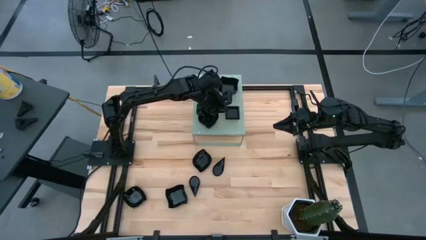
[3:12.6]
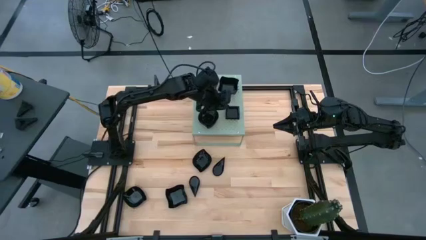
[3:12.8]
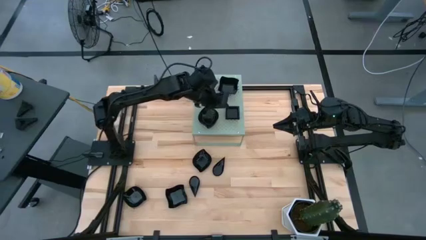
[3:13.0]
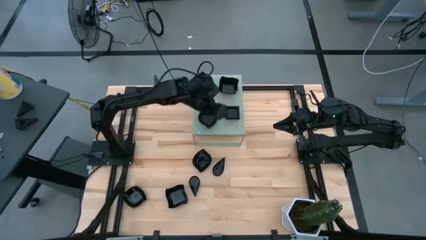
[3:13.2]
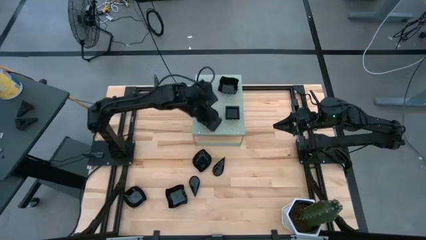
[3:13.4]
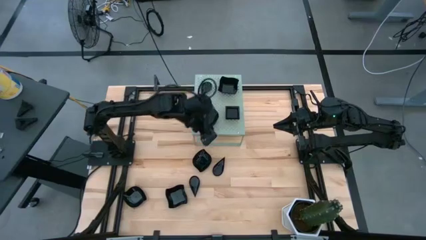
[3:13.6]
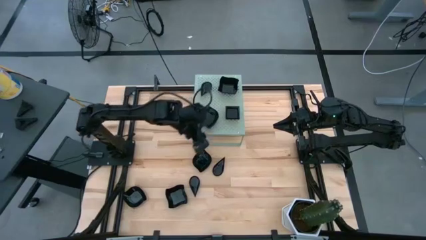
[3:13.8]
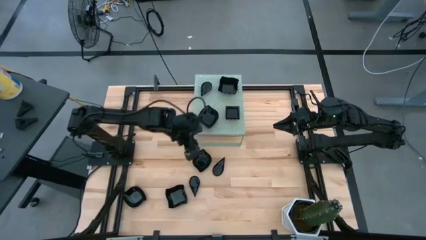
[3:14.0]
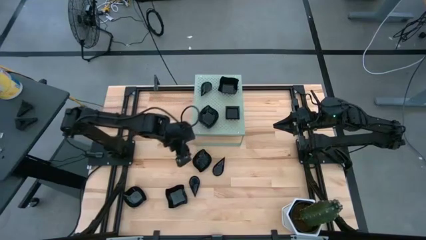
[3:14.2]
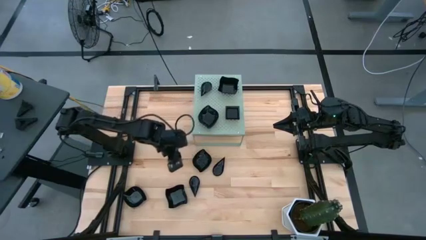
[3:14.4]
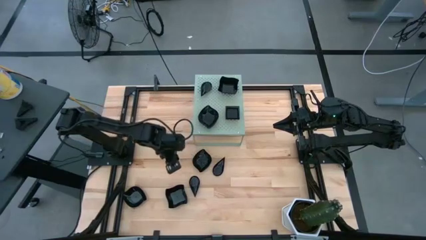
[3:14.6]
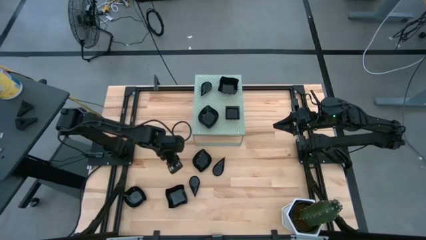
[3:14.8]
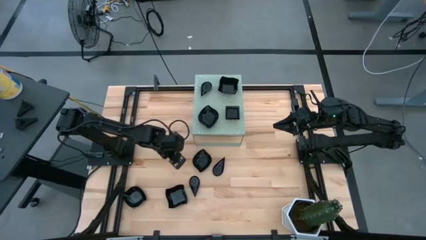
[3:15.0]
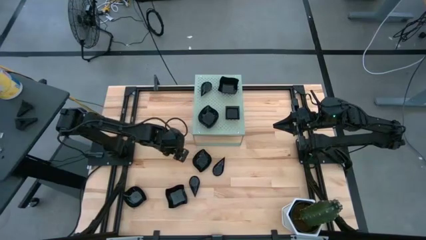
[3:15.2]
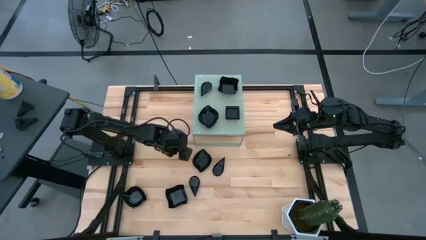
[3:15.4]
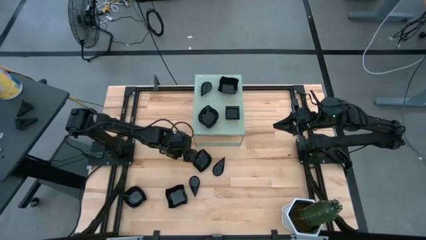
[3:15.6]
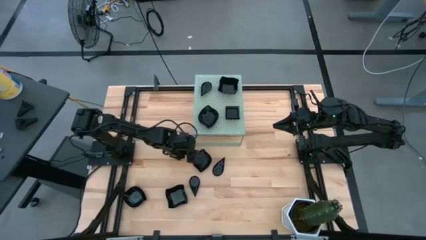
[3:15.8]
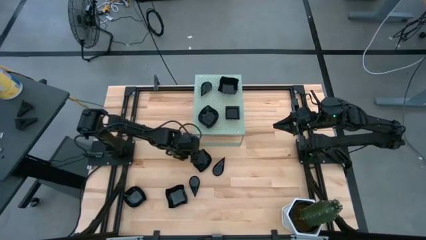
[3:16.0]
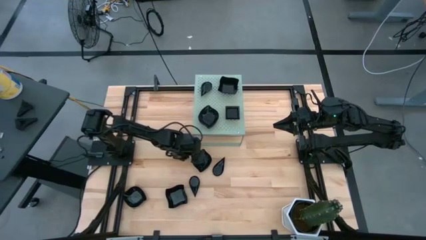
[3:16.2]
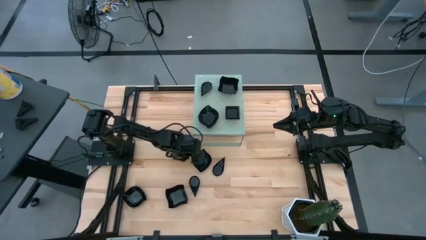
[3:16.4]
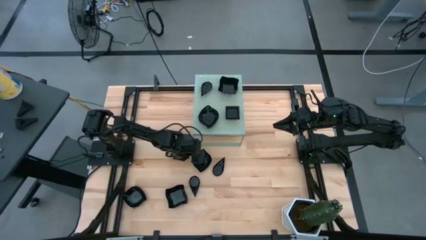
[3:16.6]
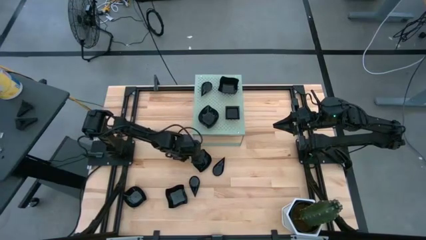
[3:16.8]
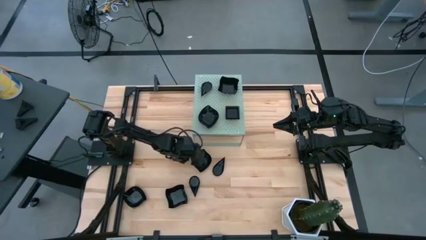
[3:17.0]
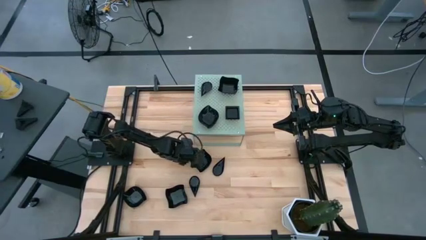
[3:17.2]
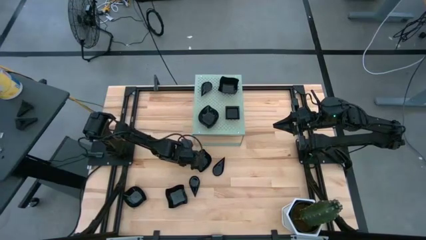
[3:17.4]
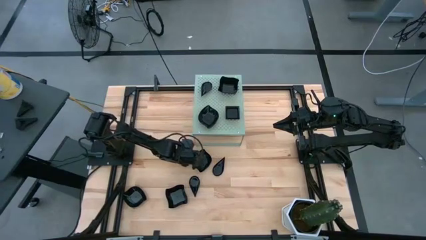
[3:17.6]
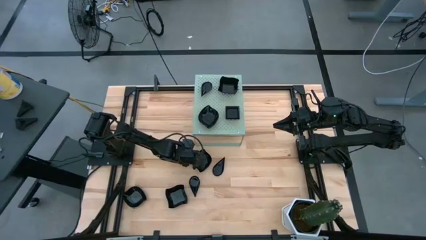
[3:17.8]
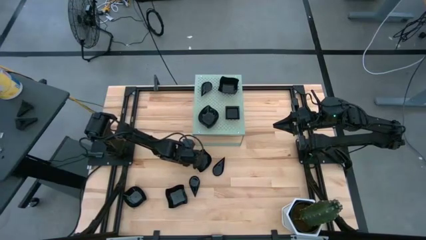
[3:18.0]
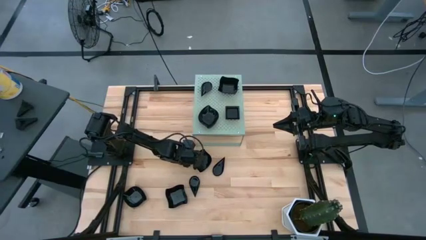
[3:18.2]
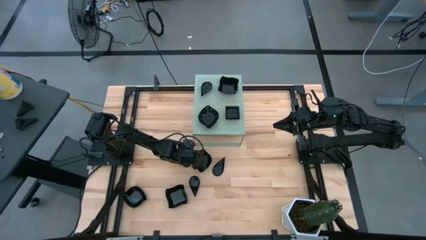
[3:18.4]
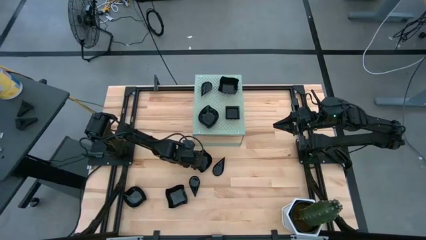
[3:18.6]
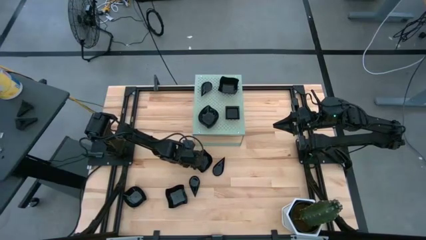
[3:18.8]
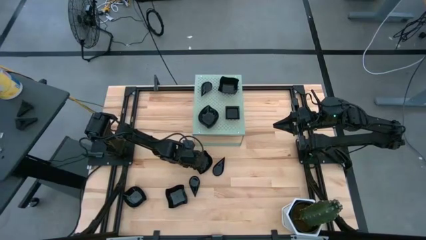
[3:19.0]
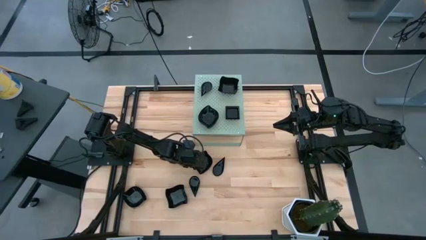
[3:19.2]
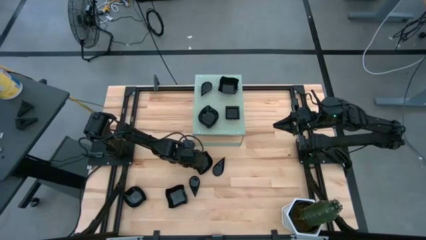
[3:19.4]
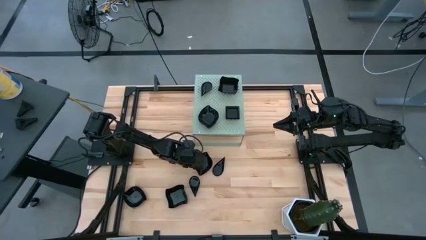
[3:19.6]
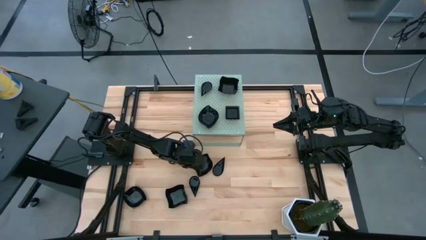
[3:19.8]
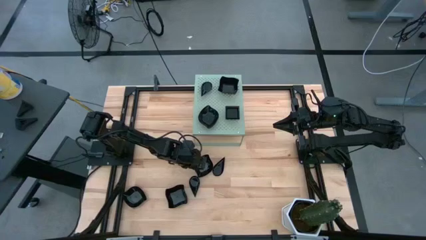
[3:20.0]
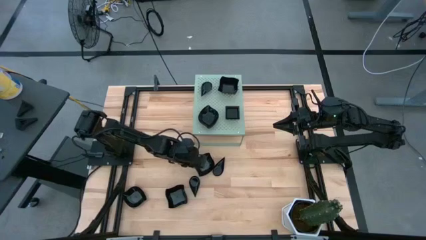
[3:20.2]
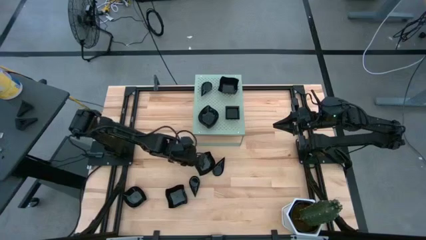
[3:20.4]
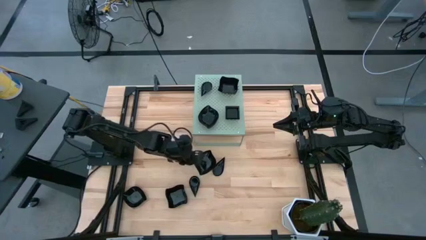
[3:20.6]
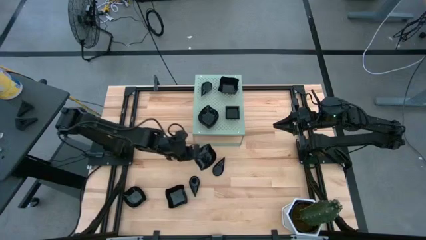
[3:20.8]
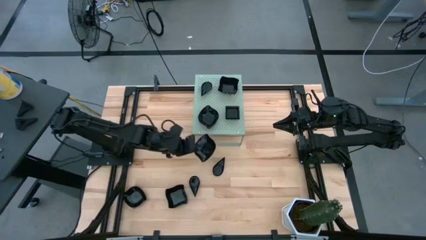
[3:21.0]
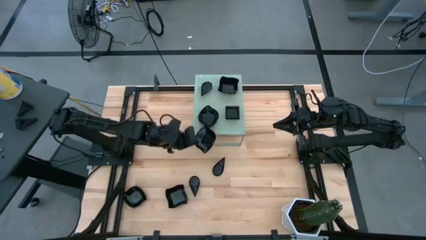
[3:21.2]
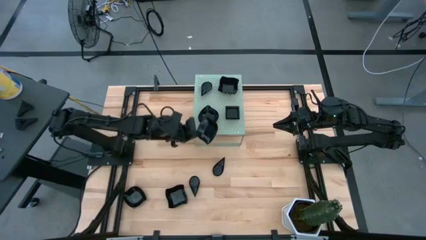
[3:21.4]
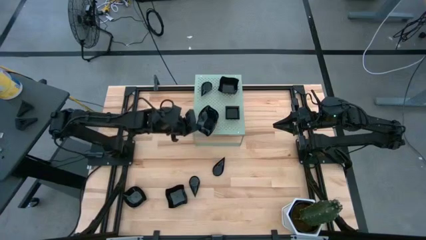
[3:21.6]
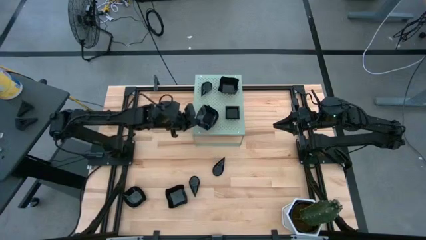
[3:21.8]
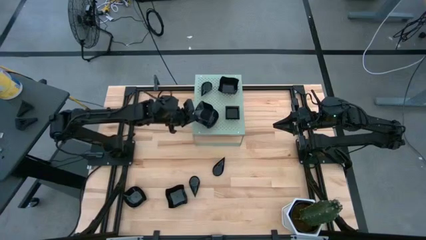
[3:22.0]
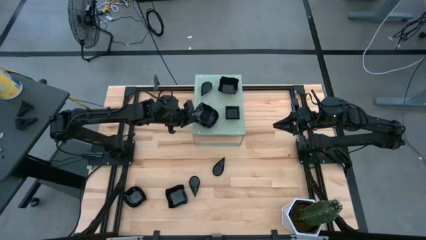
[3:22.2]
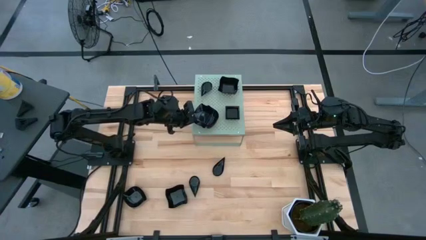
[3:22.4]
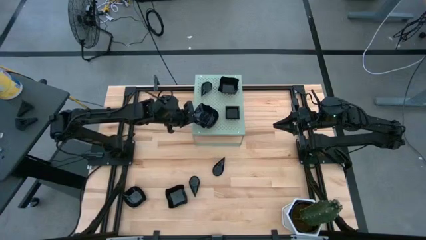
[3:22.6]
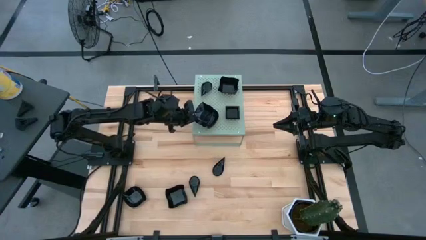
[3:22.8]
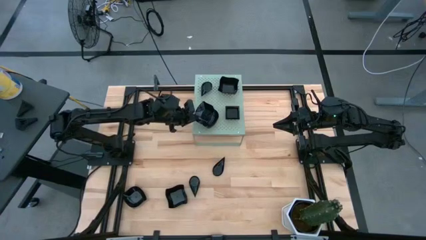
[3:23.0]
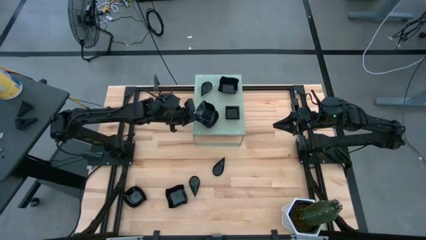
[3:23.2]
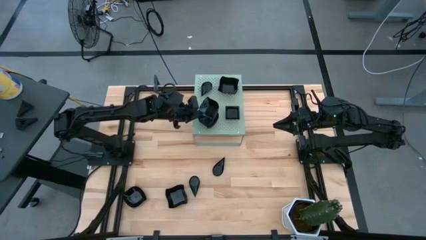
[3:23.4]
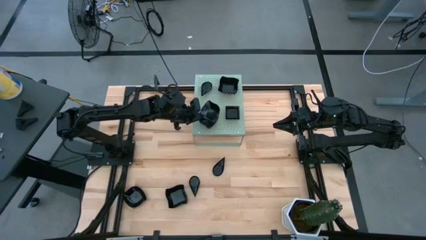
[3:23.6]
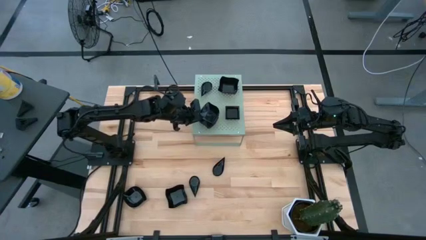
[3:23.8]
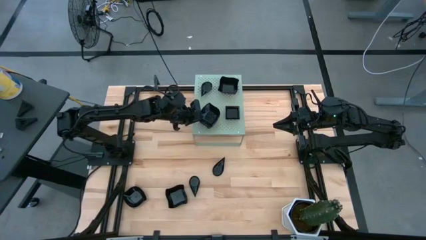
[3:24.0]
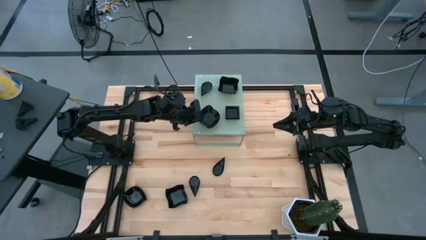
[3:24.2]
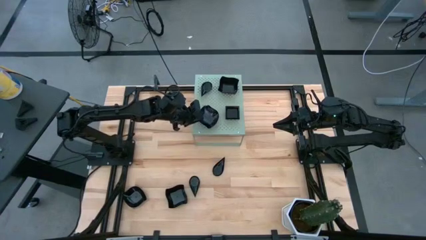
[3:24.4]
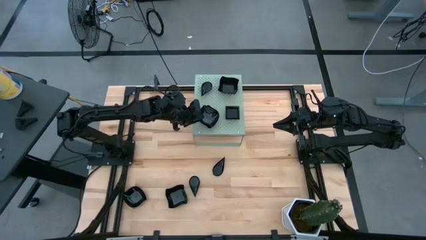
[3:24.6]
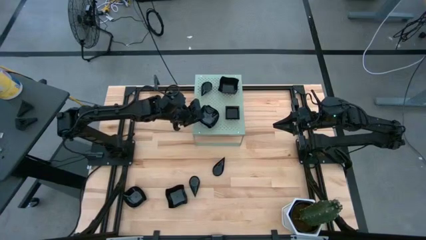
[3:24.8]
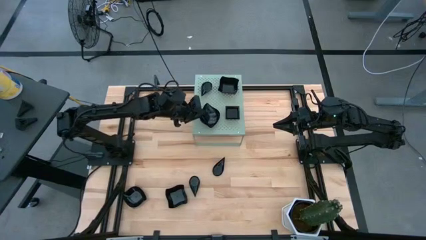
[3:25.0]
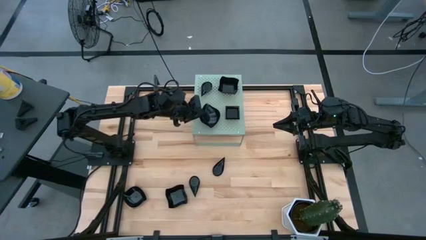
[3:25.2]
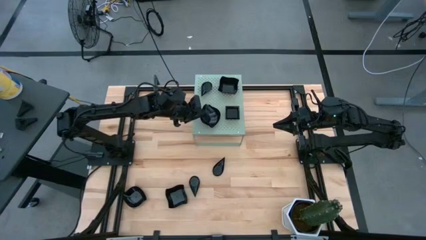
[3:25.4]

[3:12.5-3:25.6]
Task: Pick & Place Mini shaped plates
Stack the leaf shaped plate on top of the leaf shaped plates on the shelf

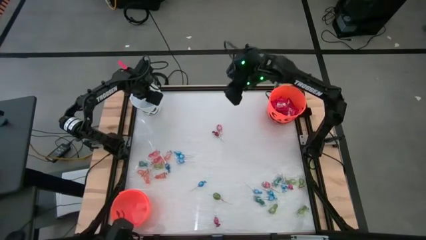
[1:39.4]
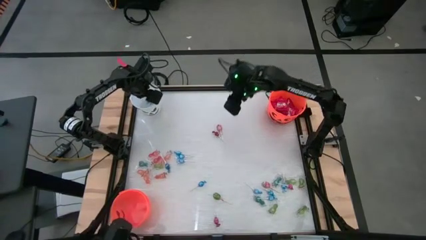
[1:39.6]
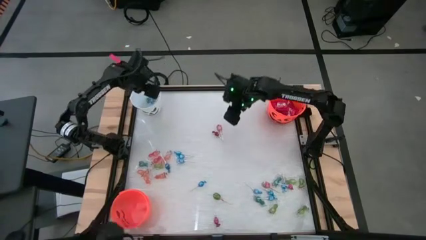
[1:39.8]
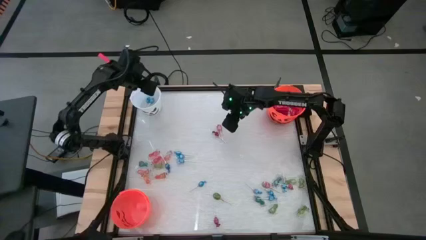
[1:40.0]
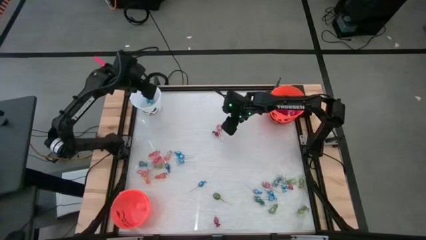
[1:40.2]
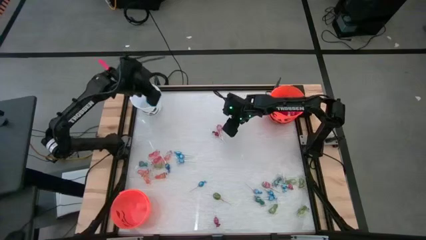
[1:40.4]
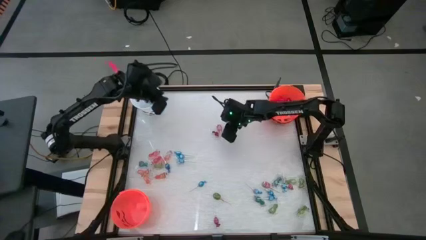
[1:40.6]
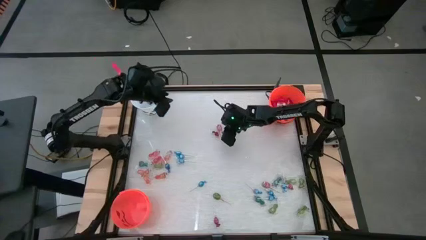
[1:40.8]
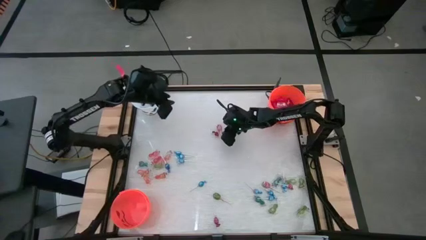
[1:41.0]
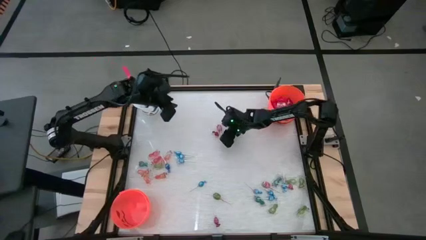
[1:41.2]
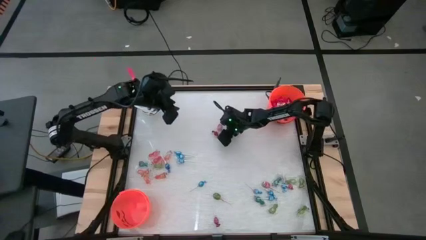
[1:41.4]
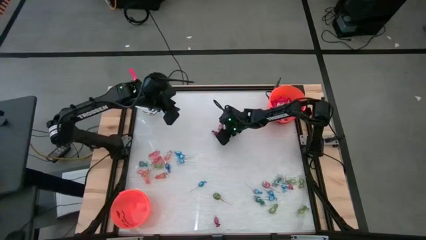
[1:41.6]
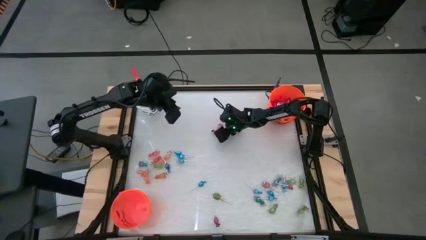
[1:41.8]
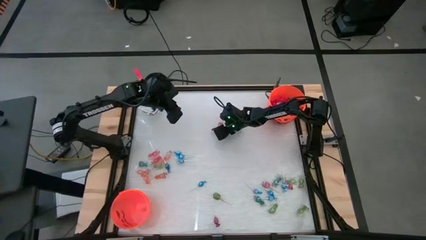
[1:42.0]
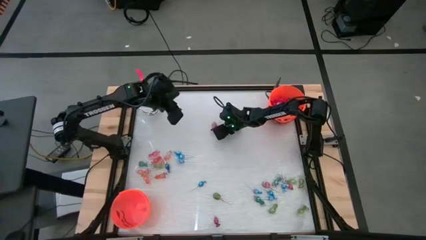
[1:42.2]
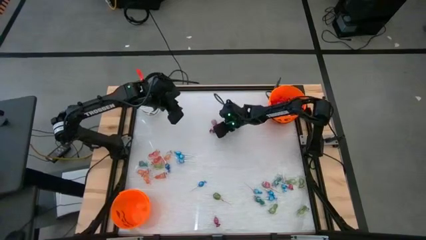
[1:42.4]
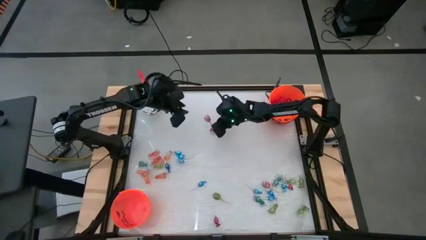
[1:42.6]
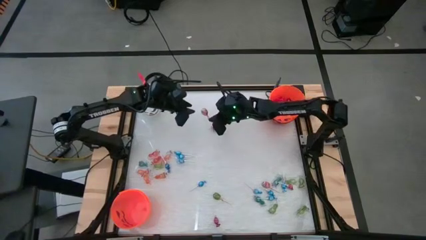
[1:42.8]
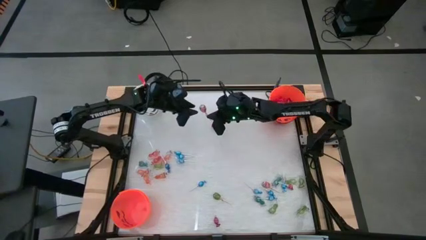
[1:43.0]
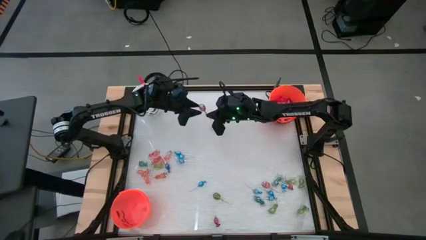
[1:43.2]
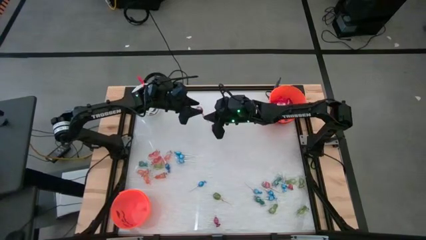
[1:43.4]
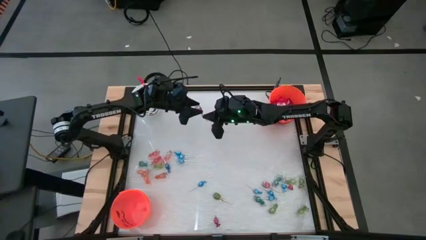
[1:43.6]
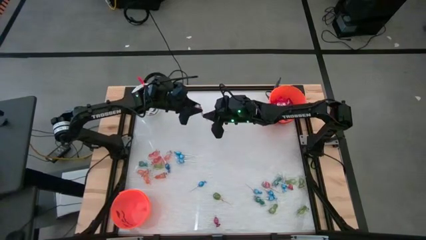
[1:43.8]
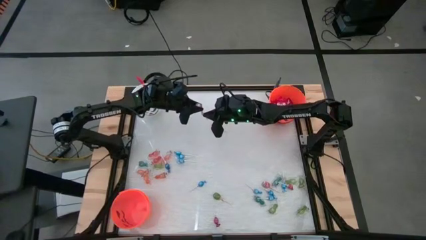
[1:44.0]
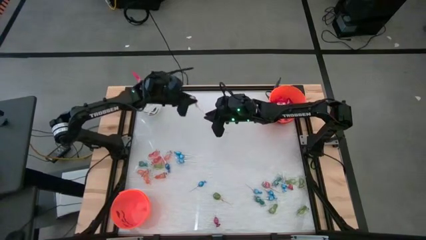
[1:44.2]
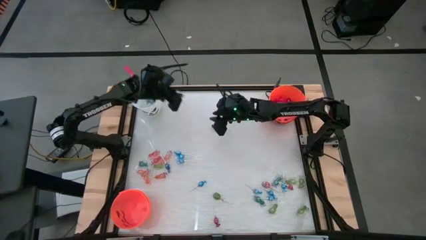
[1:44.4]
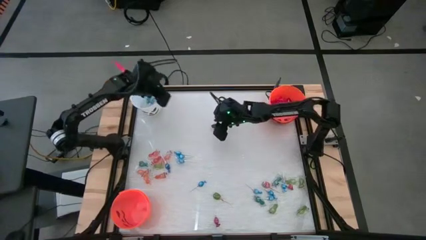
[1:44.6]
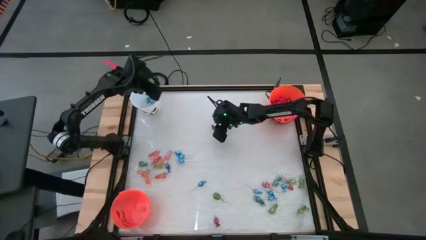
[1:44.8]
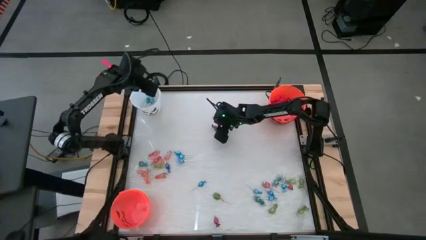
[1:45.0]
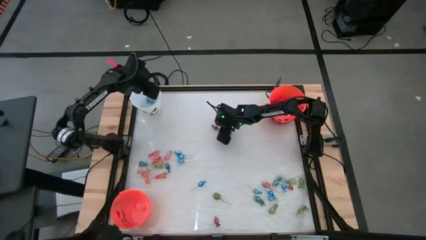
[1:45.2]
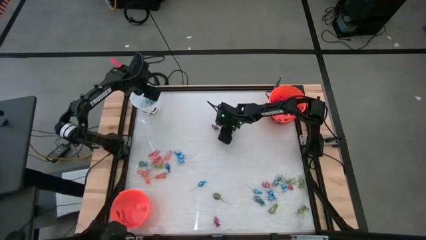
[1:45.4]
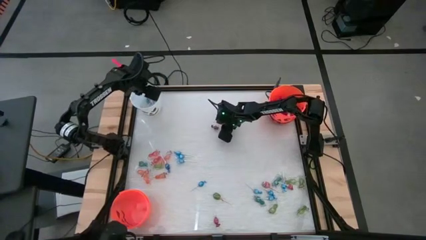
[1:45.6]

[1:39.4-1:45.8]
Task: Sort candy by brand, put in halloween buckets
Put the red lollipop into the white bucket
